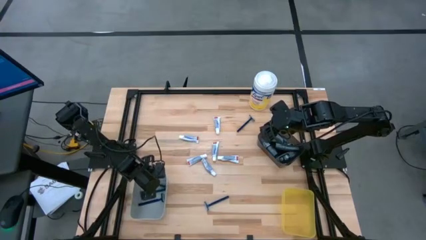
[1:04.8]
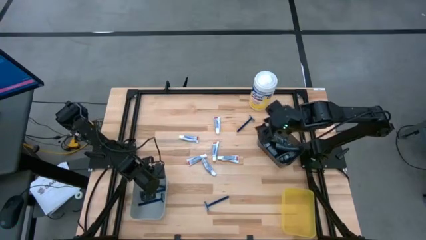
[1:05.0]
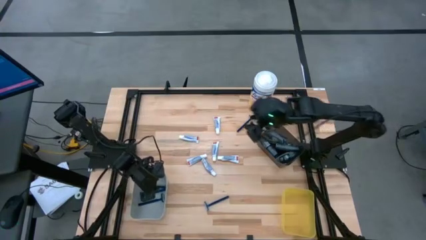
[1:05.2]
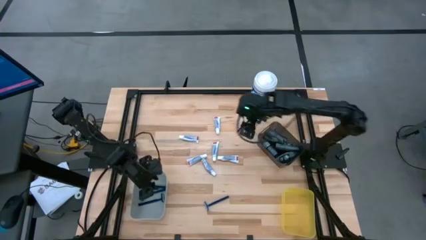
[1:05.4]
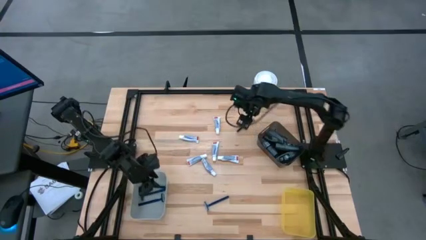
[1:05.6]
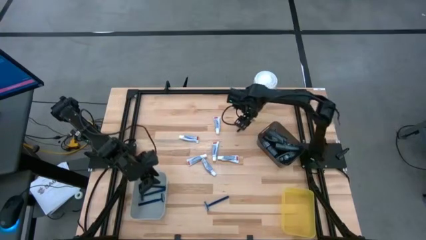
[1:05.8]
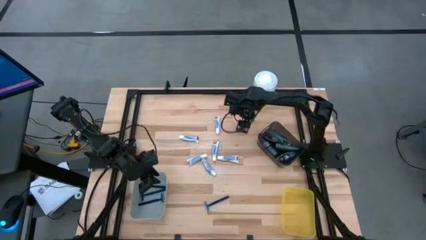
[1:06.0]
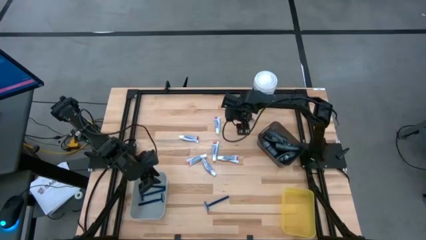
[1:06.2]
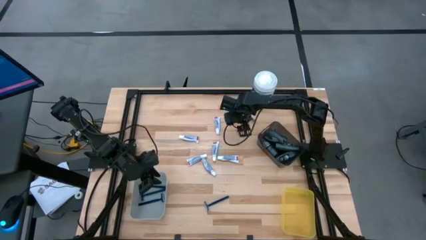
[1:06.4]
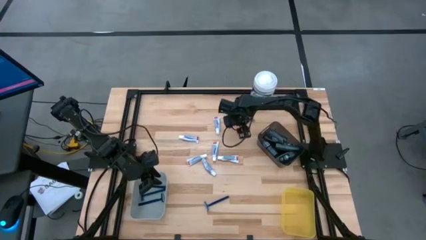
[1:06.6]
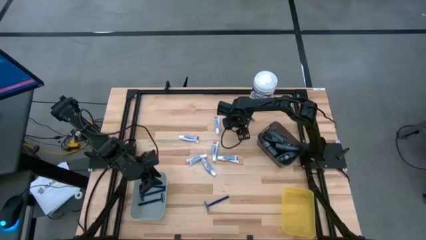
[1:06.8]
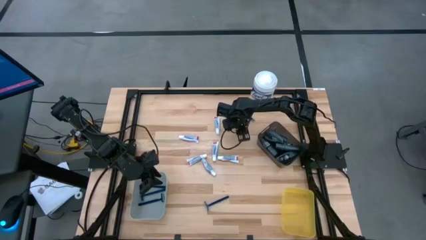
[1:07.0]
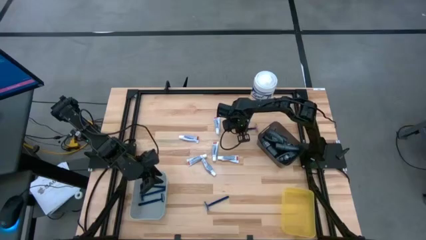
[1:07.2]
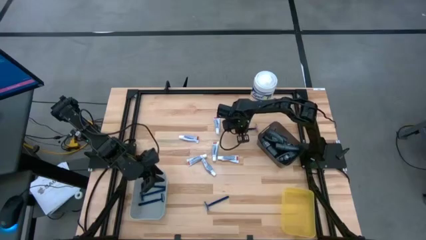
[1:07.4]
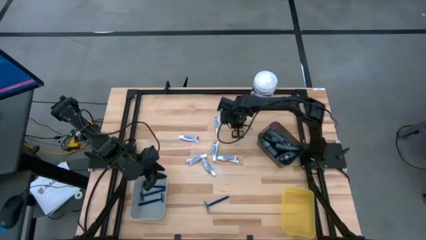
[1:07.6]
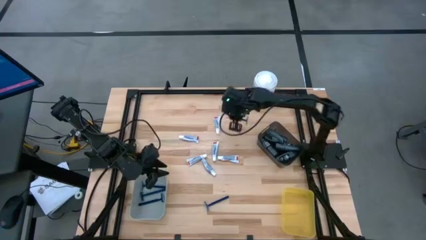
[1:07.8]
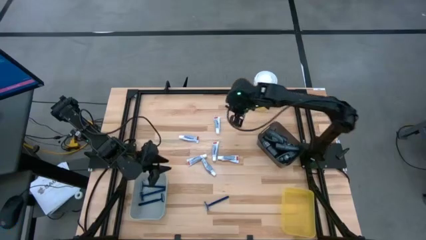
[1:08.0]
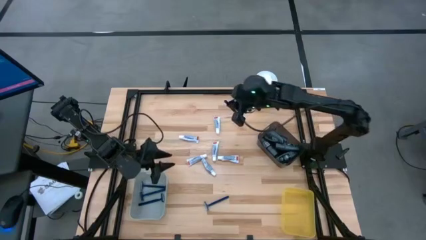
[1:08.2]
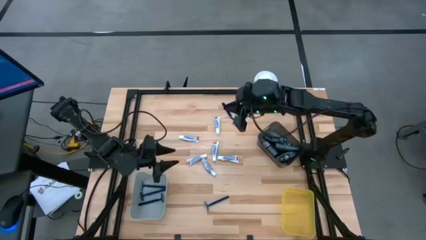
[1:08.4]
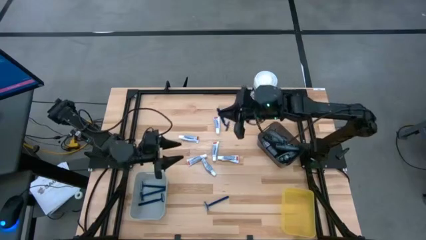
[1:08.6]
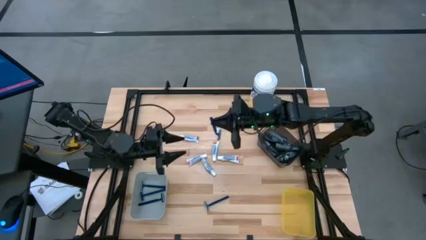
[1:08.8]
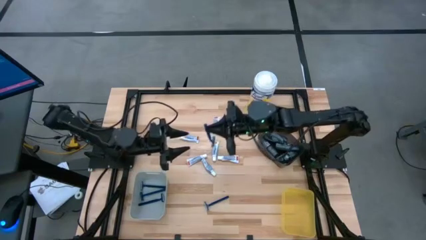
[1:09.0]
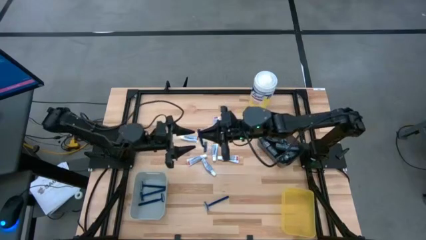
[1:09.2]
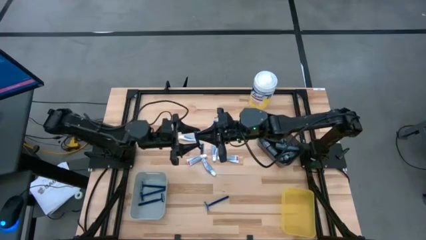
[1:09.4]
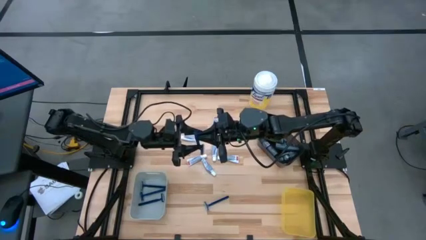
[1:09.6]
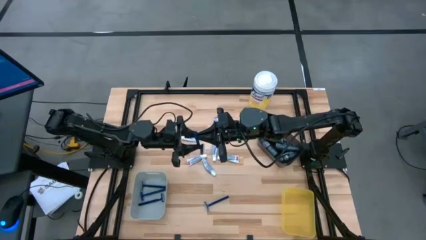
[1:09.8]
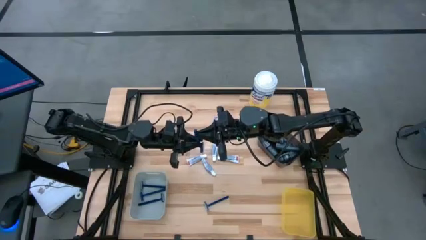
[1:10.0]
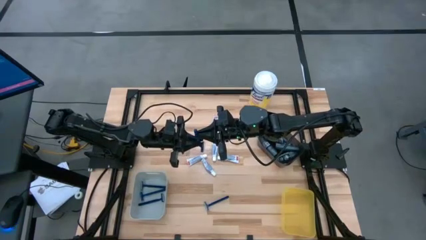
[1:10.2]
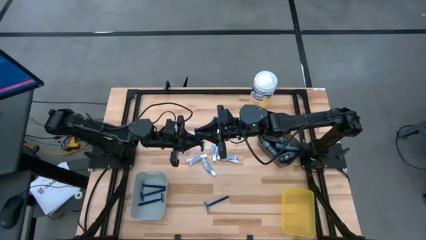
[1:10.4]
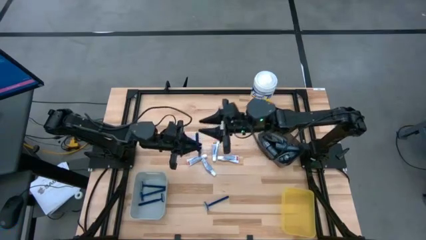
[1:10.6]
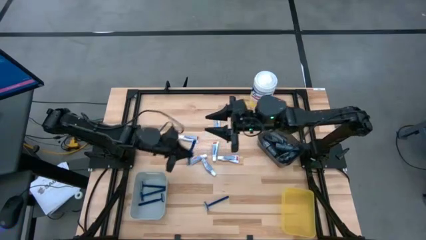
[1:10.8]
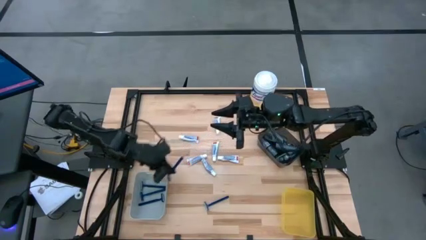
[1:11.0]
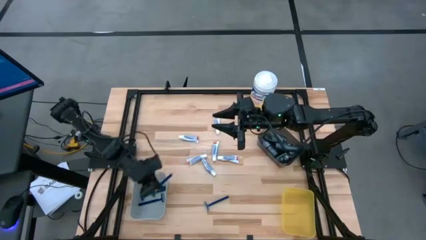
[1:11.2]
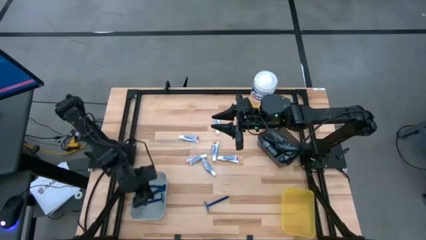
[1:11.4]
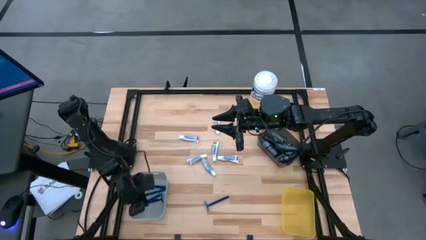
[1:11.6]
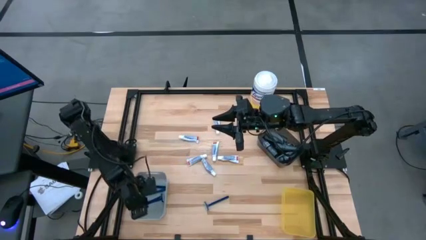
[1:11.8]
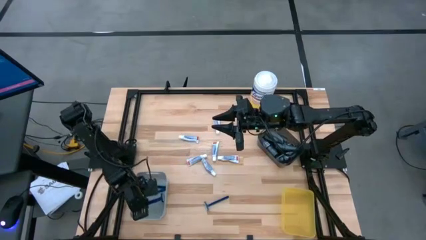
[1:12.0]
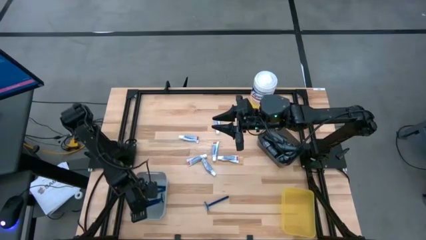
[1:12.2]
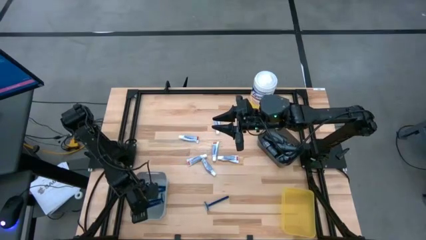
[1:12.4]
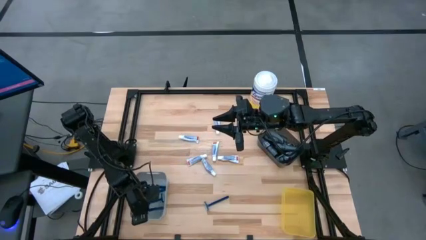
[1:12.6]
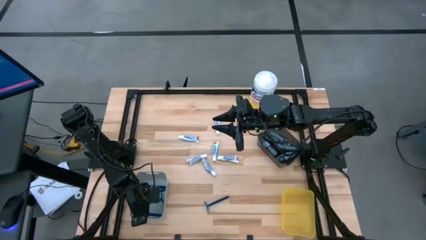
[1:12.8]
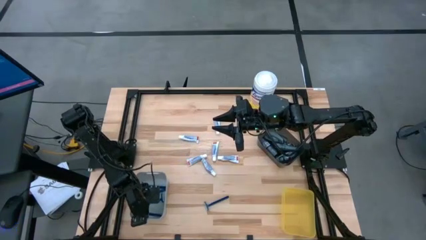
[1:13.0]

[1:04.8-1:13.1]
Task: Pick & Place Travel size toiletries
Put the blue razor into the gray bin

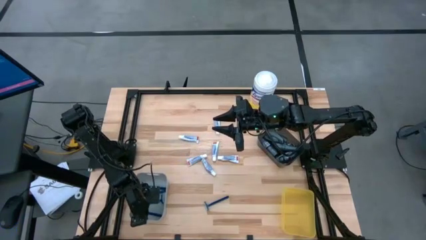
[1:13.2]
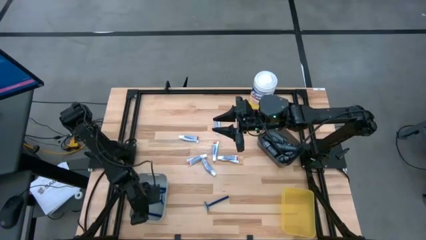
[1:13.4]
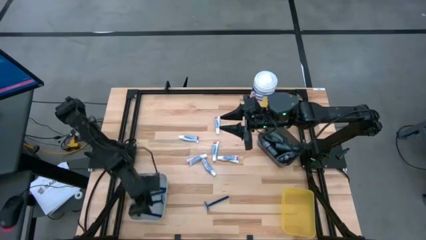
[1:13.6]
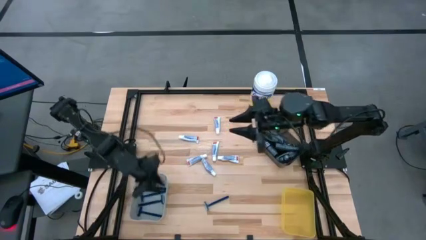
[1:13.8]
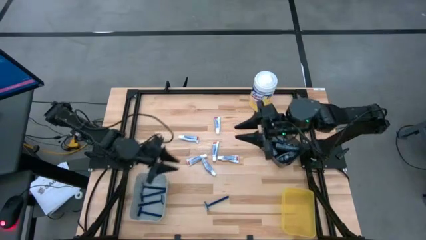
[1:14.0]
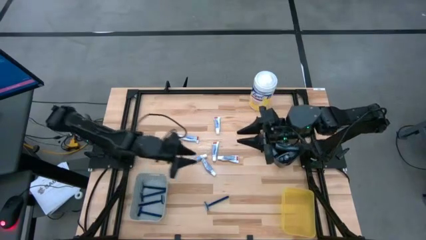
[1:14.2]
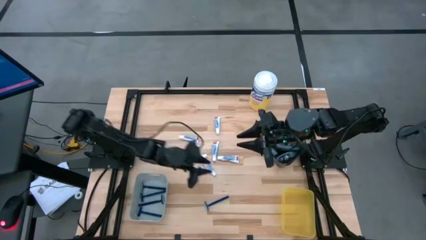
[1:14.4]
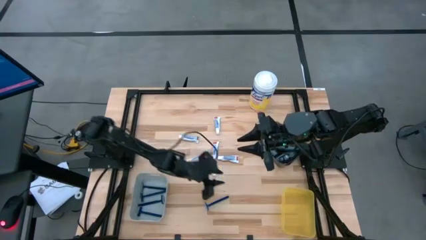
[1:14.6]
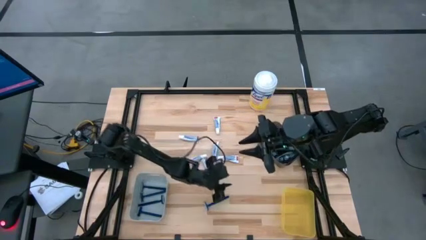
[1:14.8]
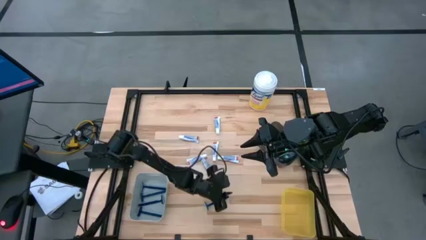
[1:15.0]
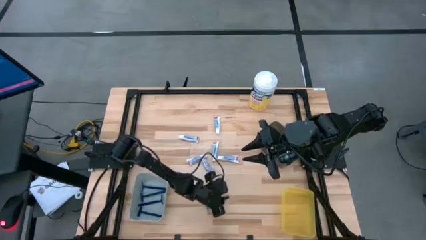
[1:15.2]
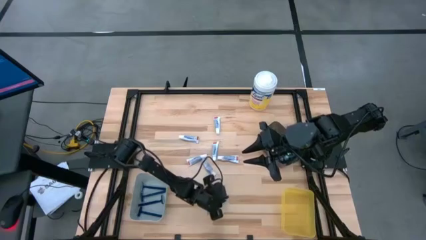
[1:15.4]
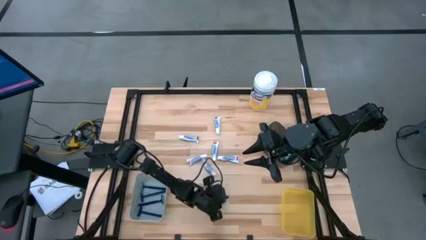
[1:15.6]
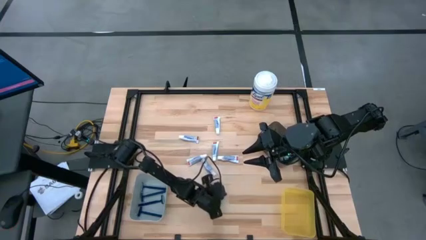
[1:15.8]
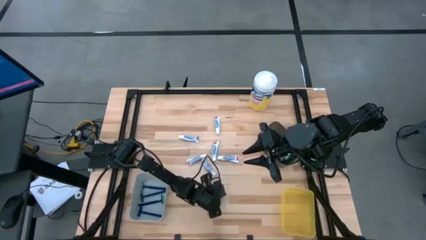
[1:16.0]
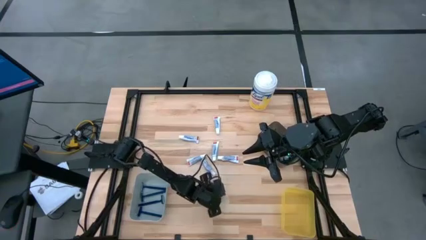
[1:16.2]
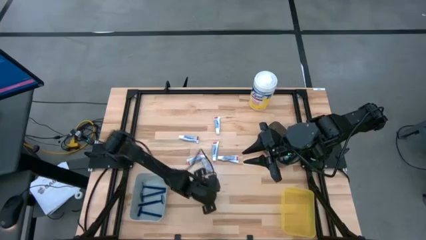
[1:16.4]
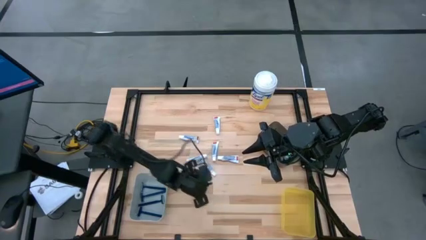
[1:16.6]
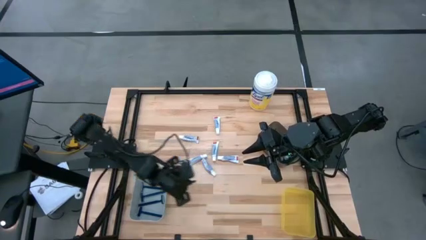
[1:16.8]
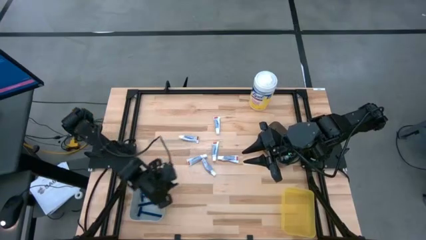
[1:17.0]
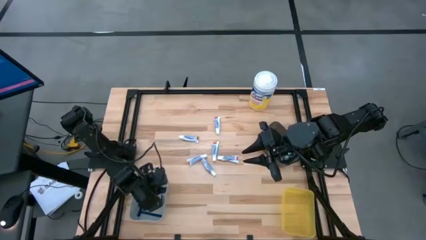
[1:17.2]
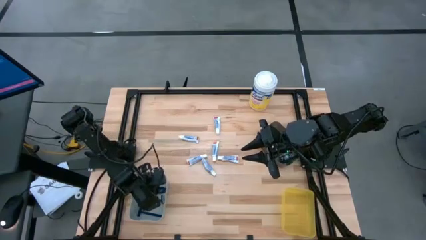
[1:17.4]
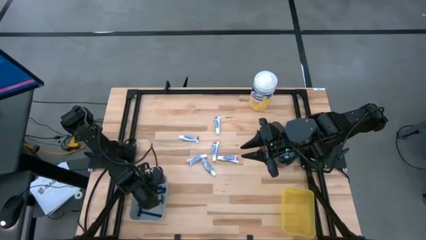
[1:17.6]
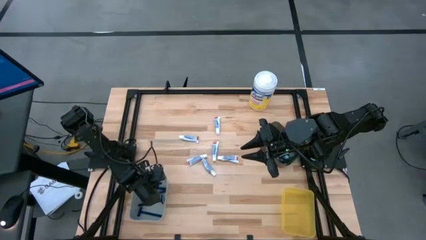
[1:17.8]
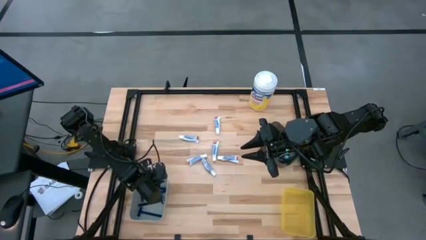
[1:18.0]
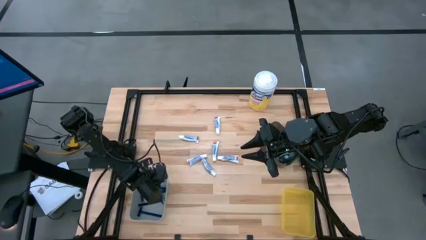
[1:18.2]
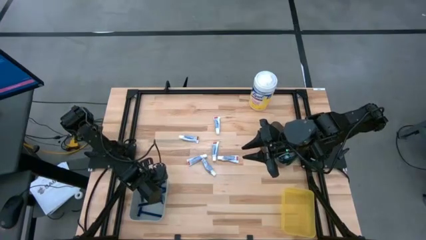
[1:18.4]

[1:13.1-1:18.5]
Put the blue razor into the gray bin

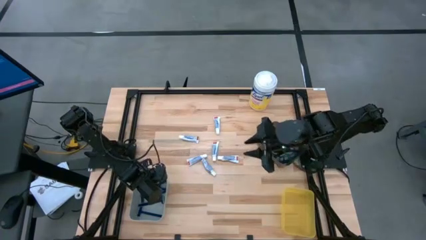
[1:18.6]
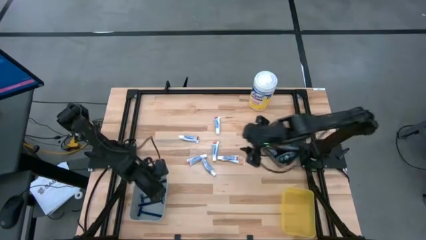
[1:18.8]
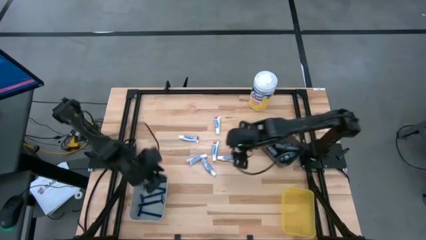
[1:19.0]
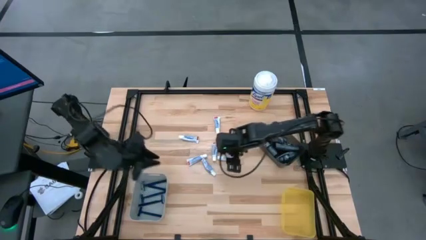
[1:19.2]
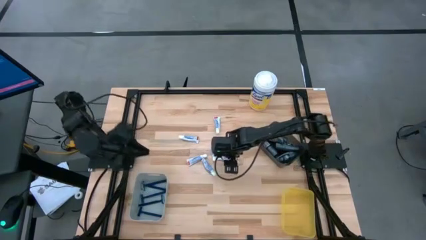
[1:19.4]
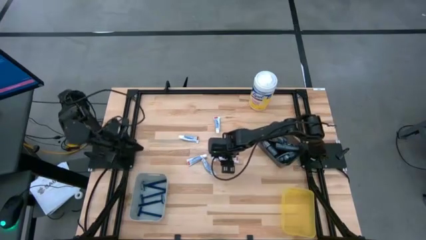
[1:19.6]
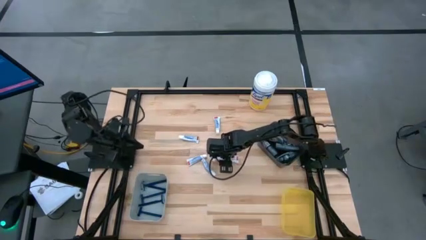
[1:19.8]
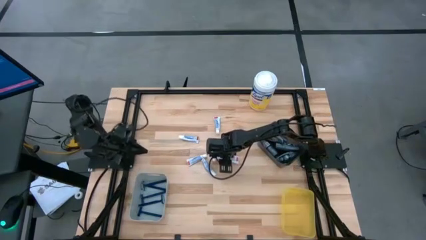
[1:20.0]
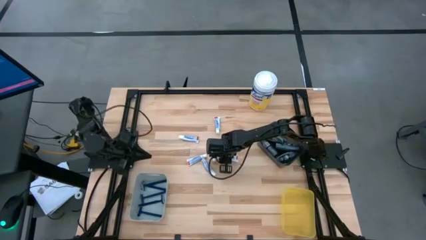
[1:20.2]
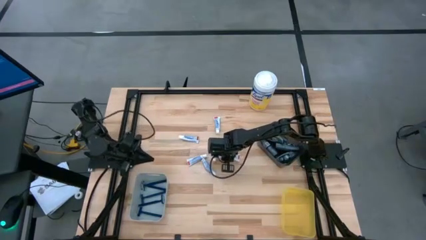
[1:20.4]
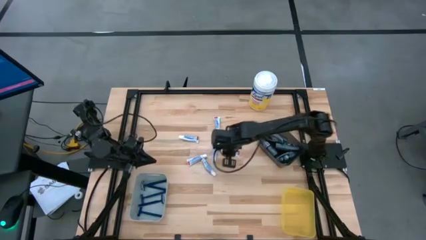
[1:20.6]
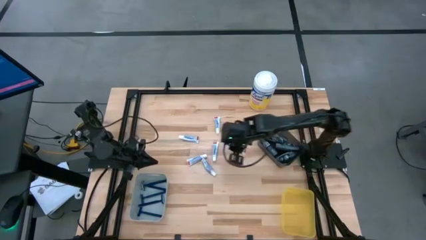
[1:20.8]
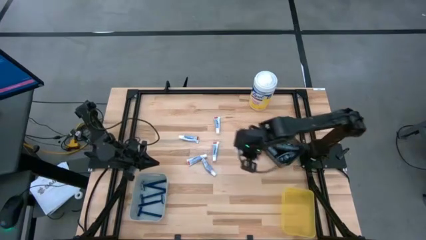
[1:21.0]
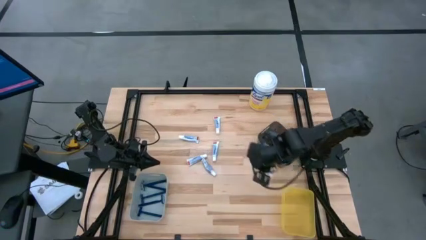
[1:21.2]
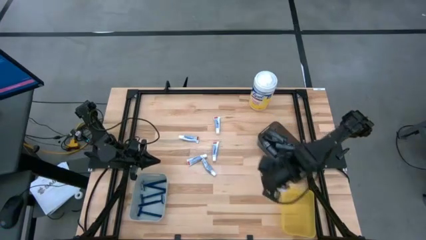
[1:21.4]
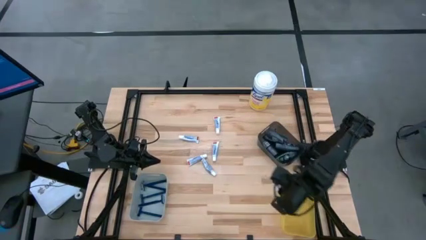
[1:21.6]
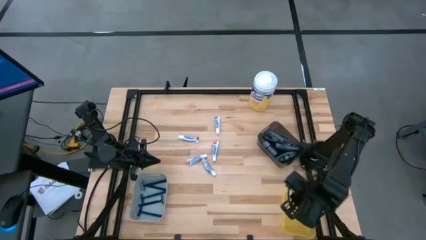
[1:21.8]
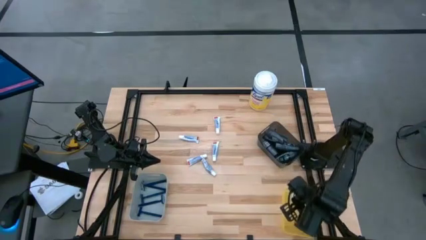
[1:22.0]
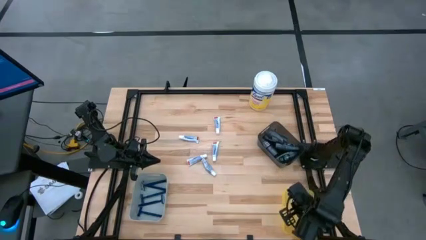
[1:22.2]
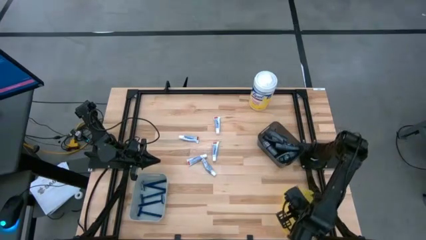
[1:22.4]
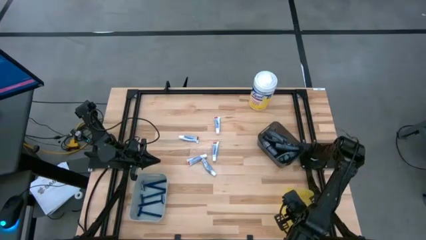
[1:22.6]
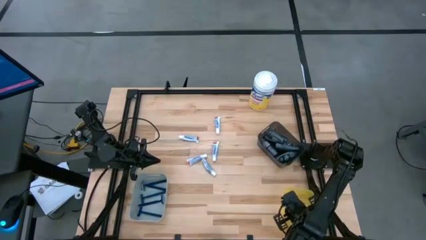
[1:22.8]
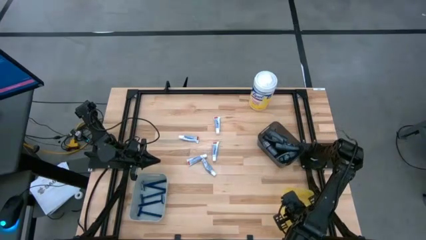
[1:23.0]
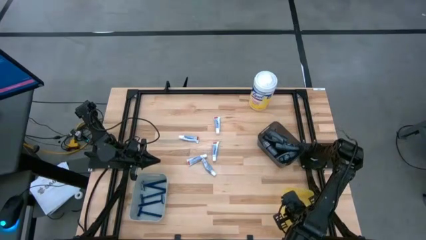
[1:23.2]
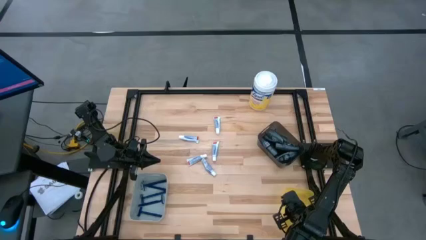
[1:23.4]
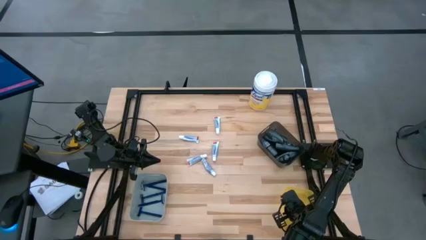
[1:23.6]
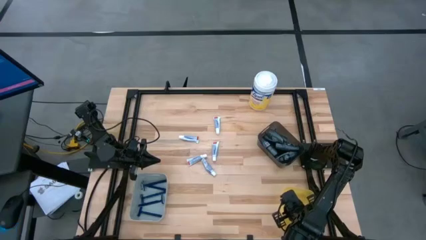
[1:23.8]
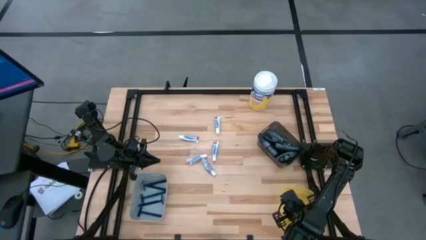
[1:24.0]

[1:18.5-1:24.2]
Put the white toothpaste tube into the yellow bin
